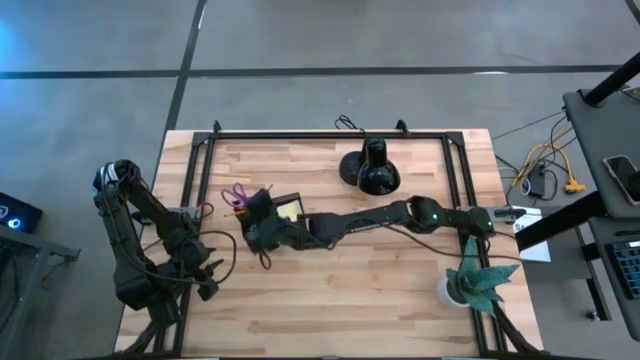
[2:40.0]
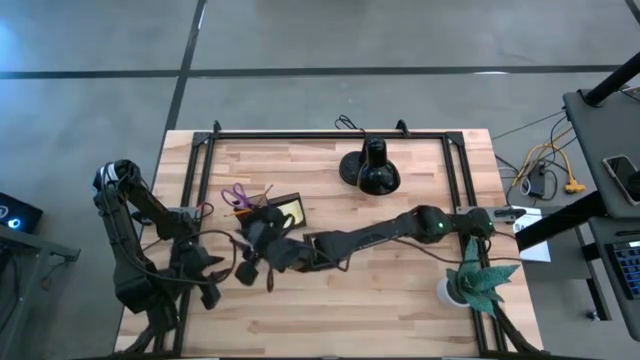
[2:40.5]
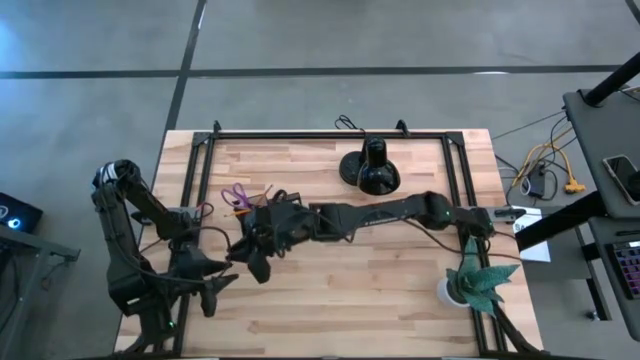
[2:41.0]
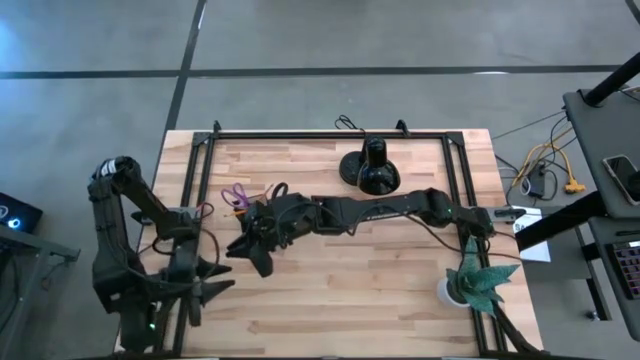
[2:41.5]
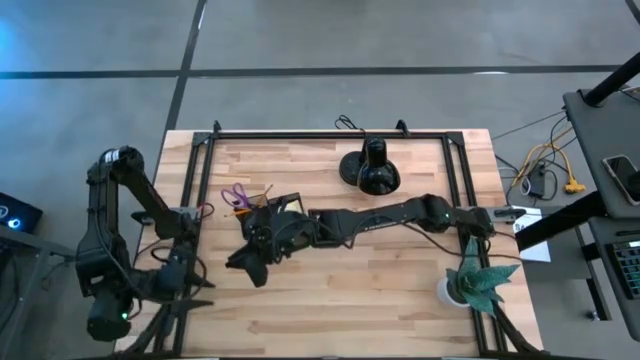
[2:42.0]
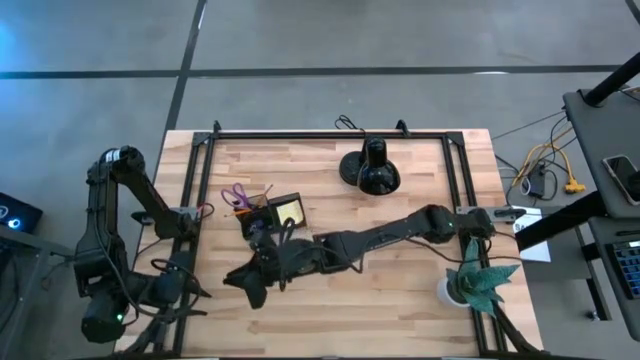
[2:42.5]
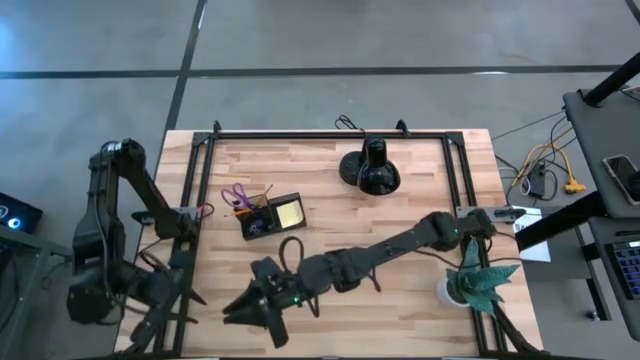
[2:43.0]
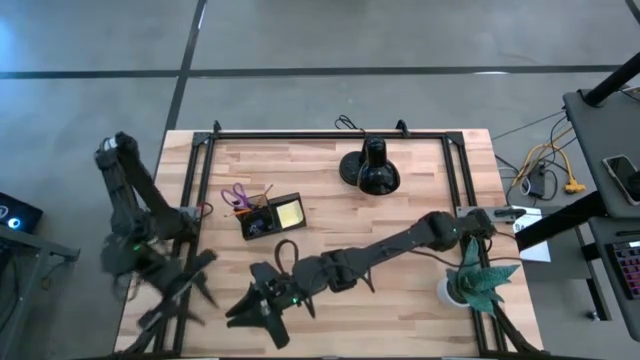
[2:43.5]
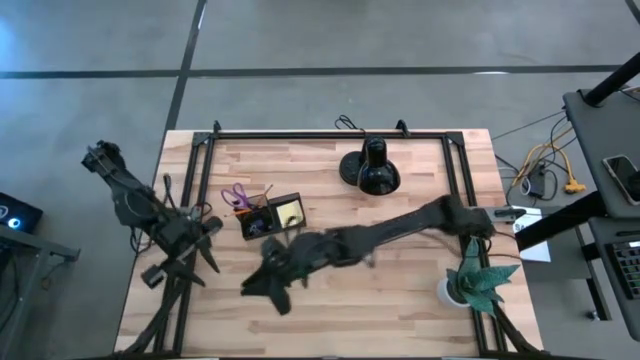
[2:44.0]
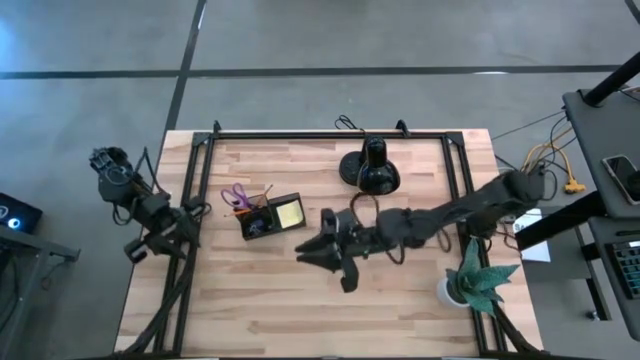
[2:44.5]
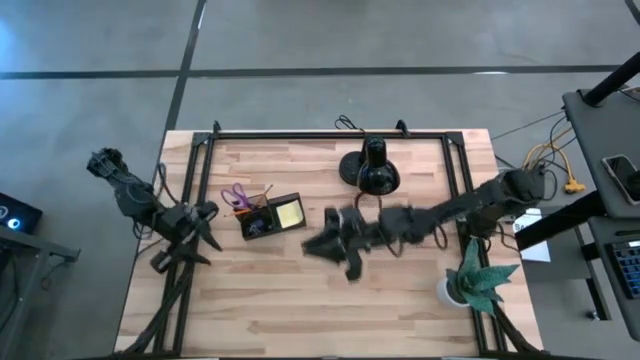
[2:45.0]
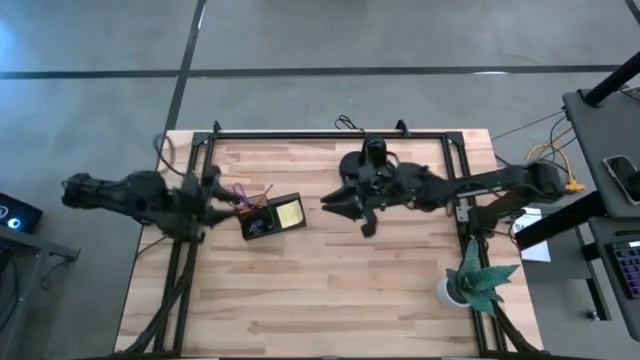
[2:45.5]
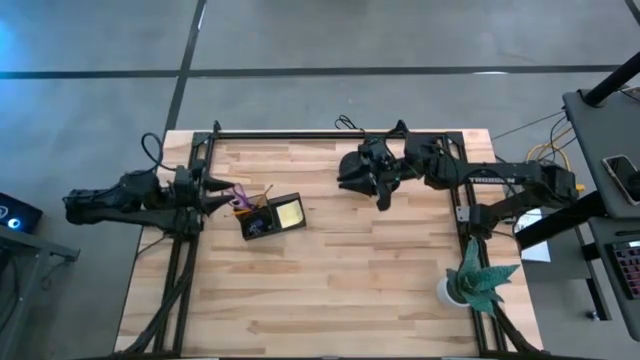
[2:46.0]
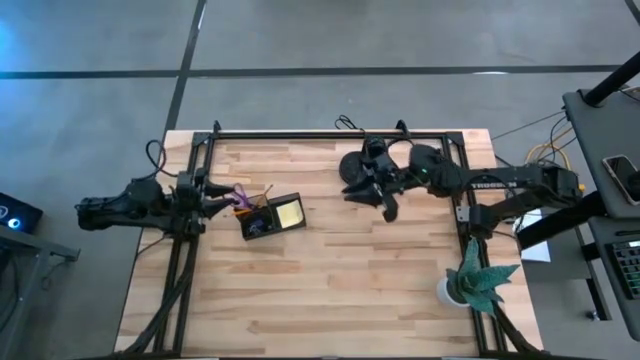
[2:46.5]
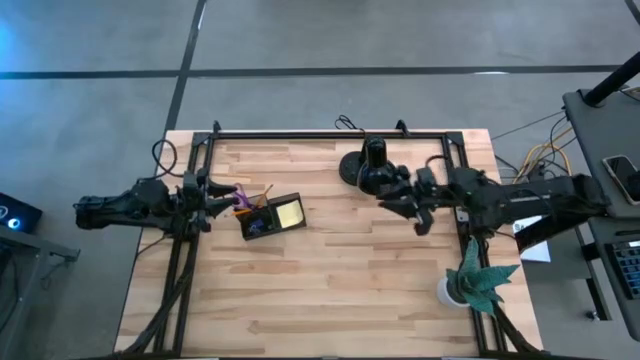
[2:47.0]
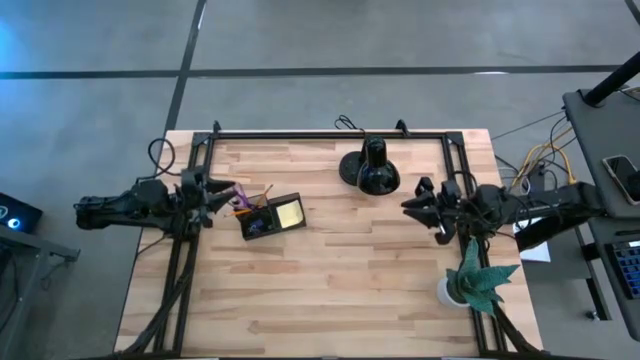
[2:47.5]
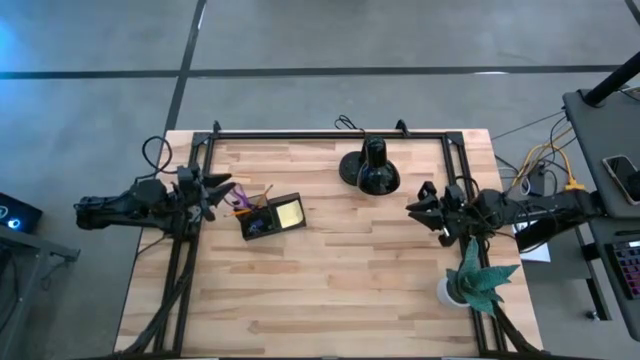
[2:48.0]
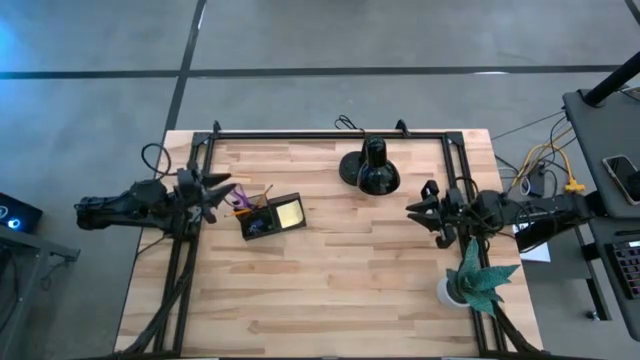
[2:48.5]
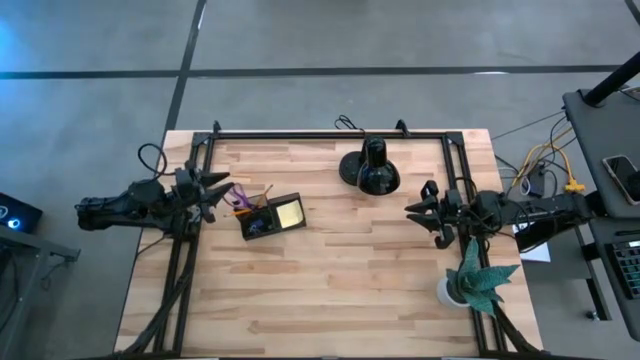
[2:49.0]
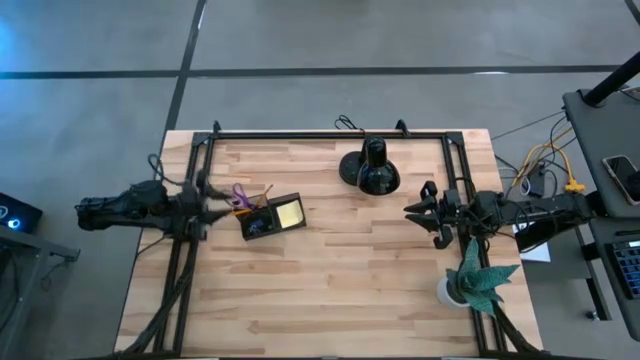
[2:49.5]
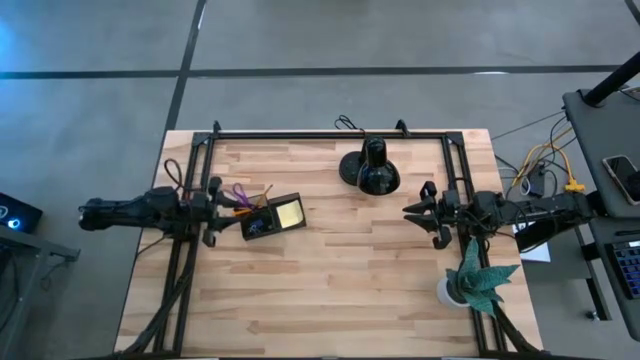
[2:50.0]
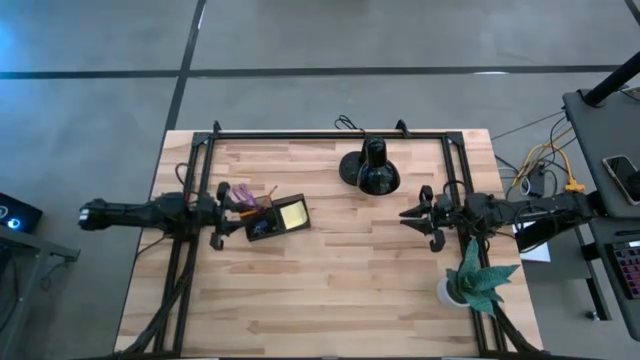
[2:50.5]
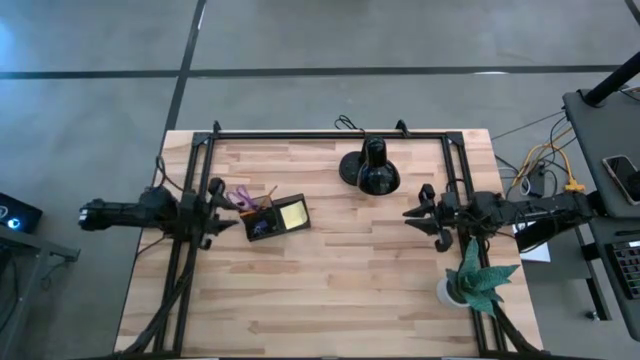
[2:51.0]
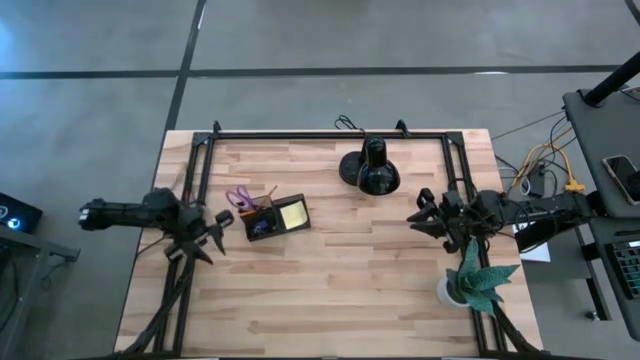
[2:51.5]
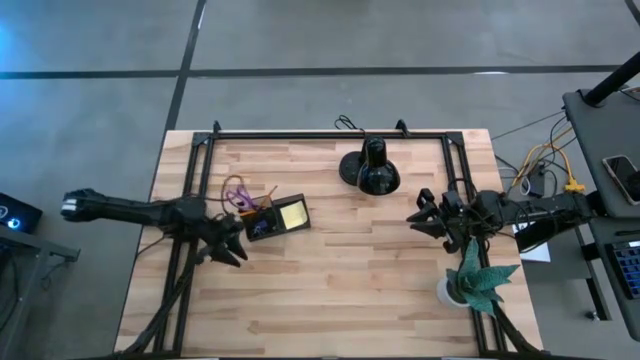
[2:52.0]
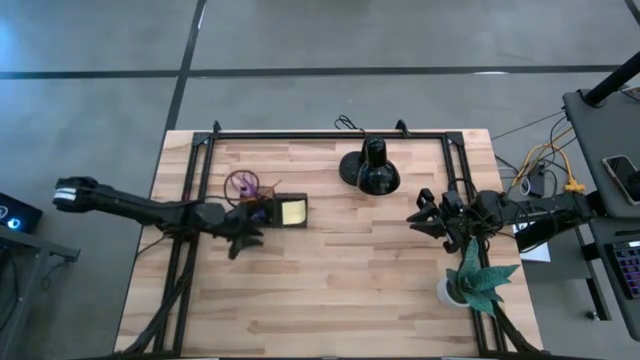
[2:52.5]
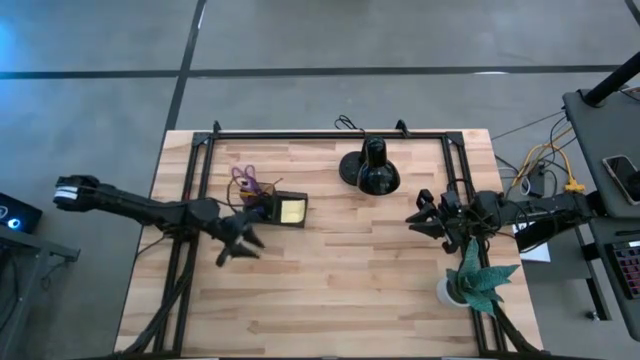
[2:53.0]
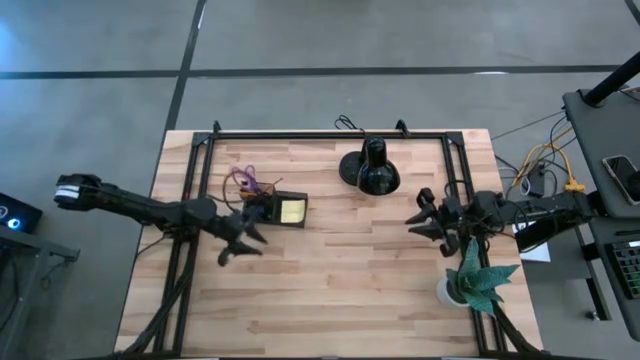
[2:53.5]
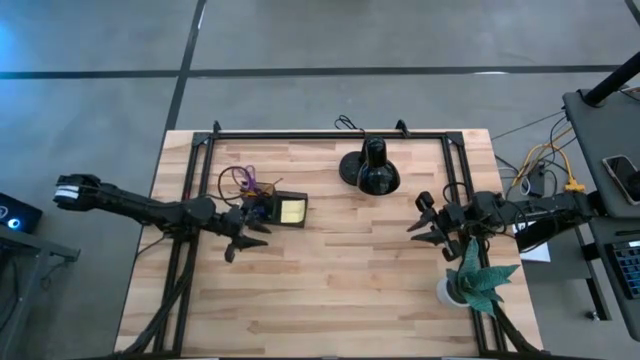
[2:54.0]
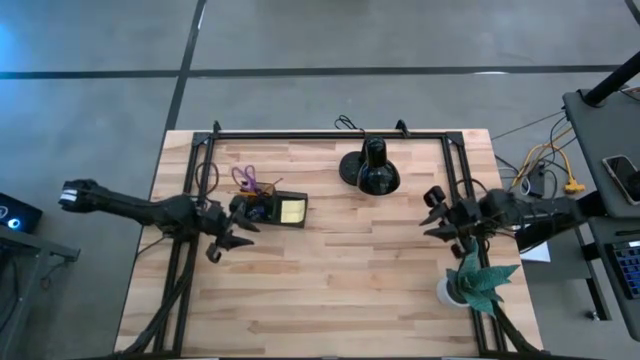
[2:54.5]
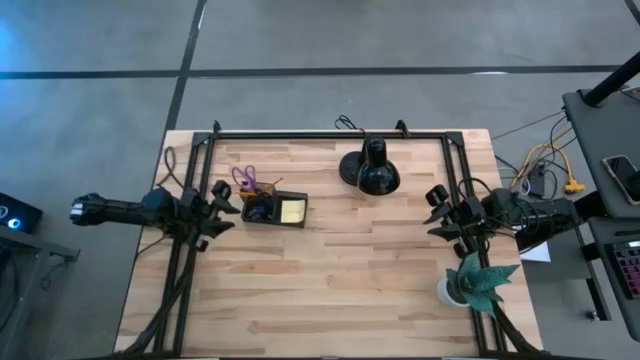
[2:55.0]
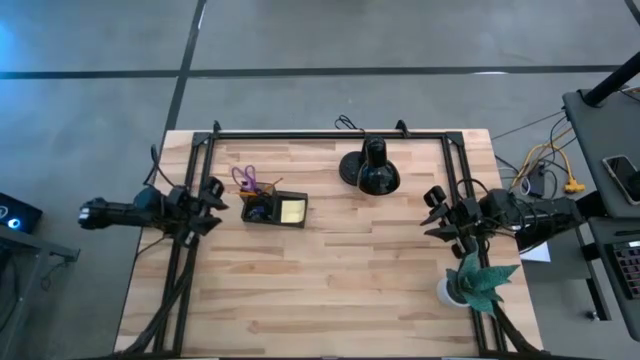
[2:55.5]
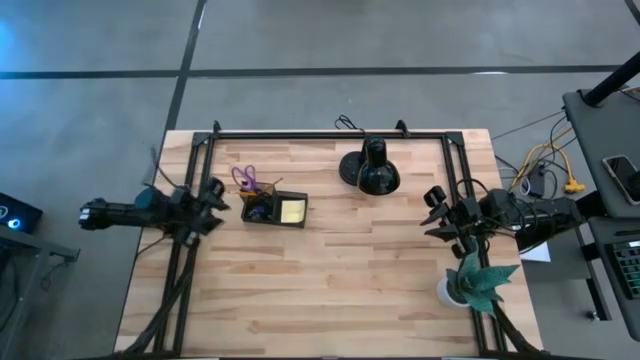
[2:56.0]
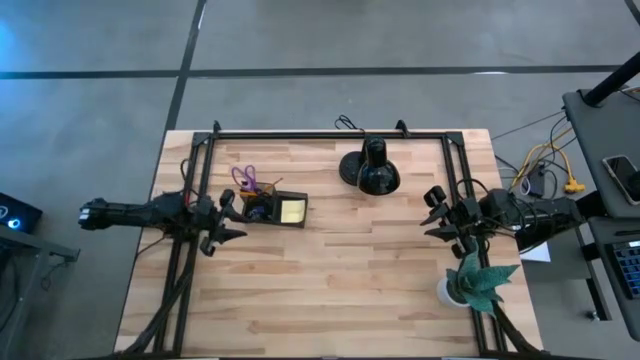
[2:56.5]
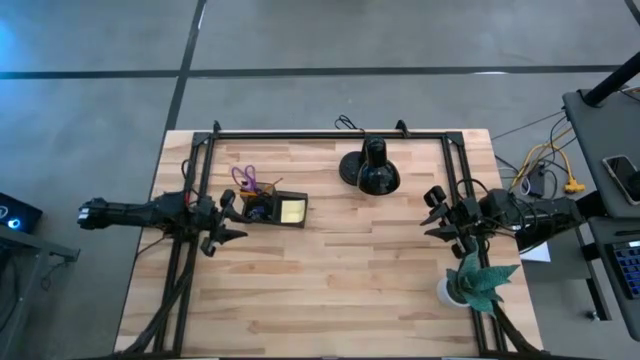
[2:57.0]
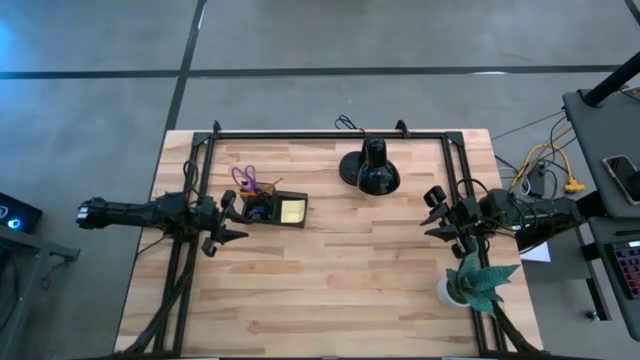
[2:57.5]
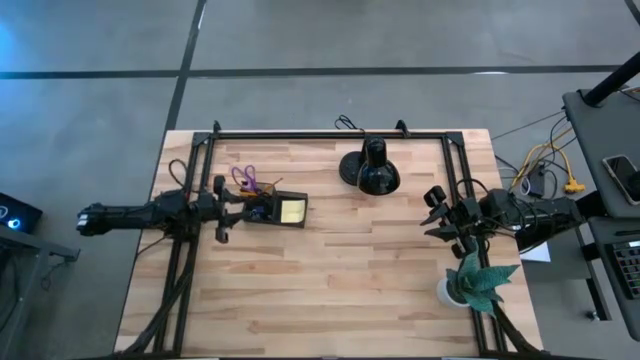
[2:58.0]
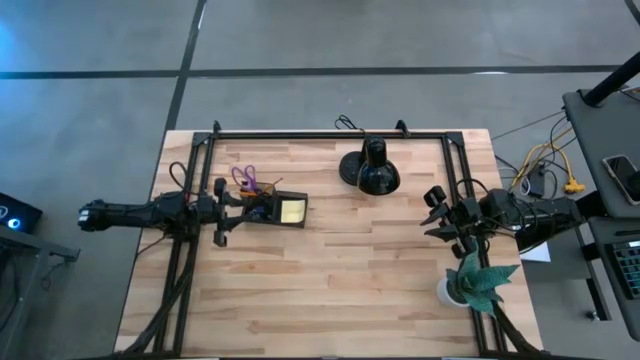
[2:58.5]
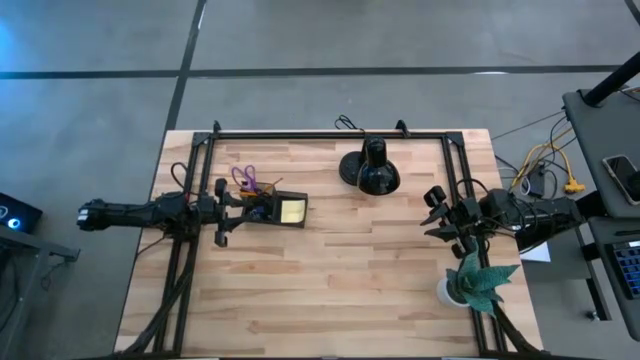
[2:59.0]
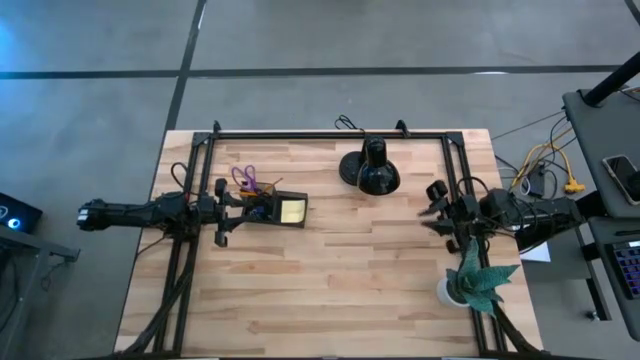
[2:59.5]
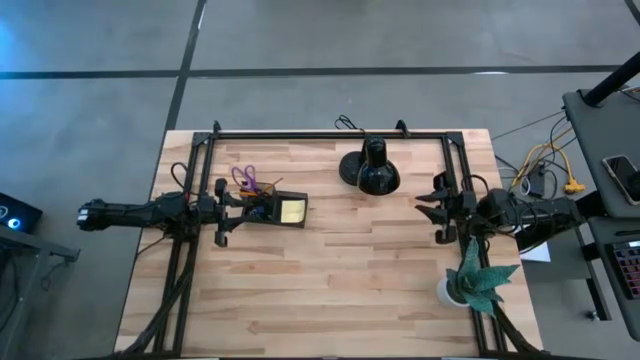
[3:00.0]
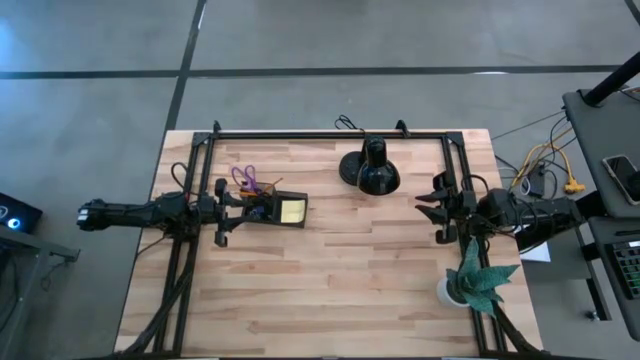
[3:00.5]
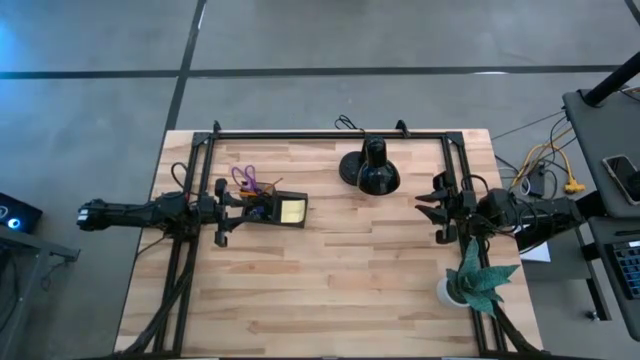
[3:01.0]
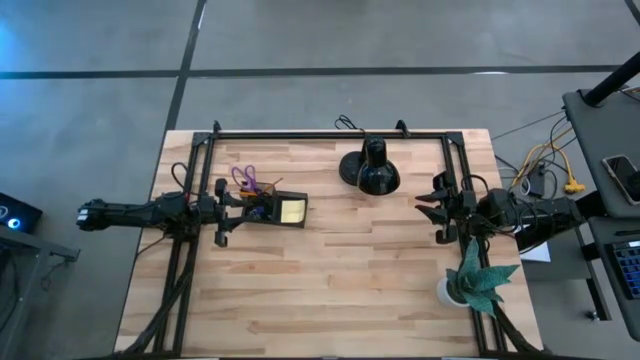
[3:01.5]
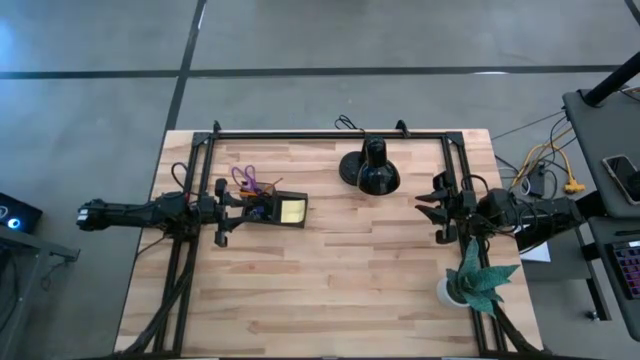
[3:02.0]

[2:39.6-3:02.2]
Task: Pick and place office supplies into organizer
Return to Home Position
